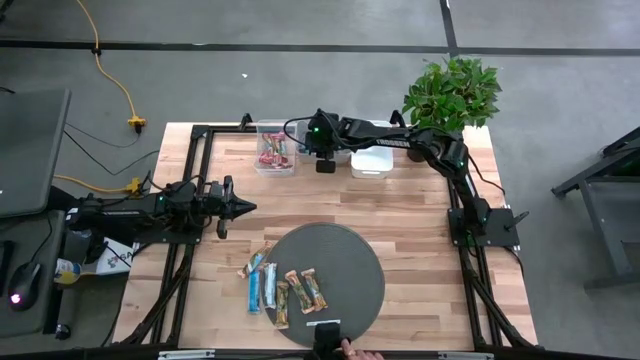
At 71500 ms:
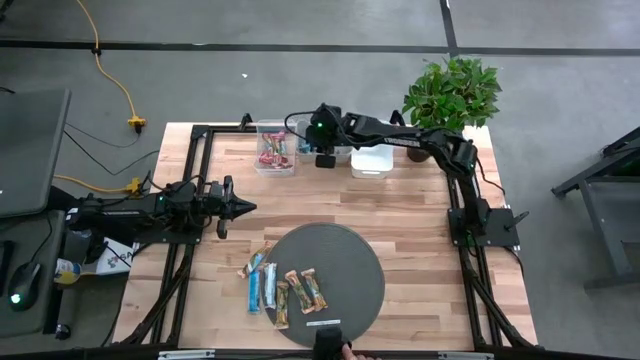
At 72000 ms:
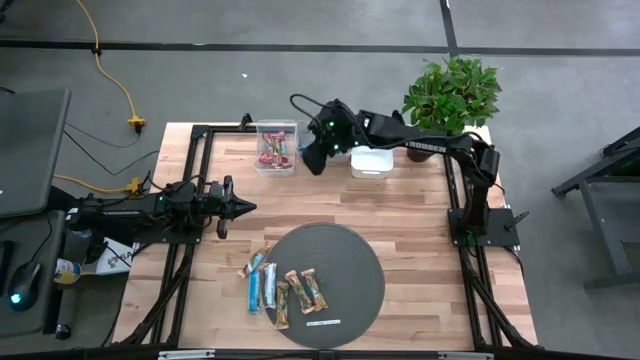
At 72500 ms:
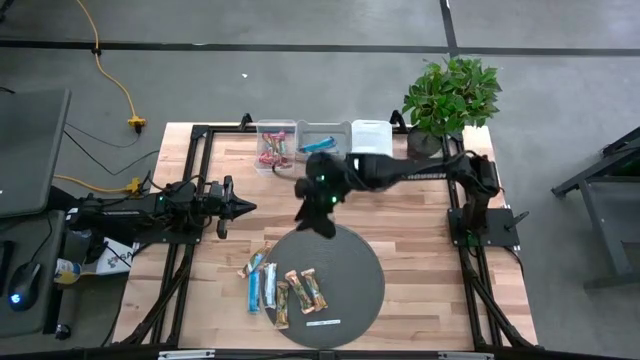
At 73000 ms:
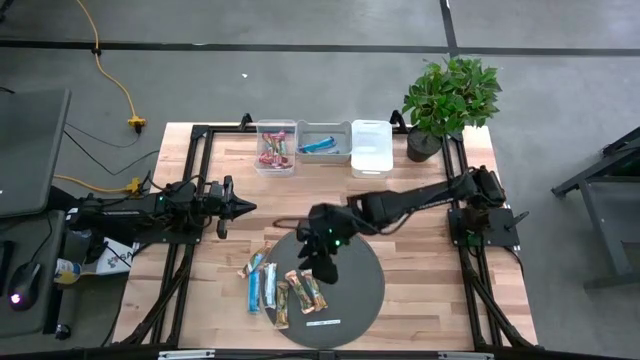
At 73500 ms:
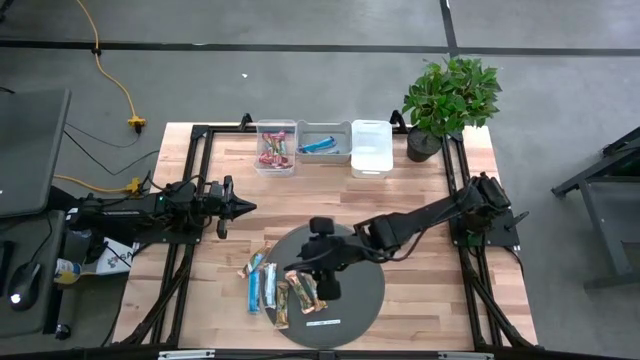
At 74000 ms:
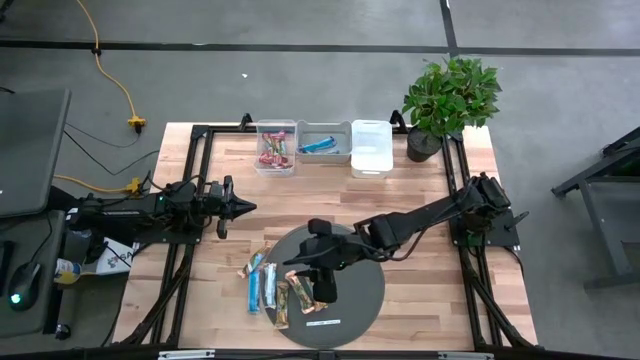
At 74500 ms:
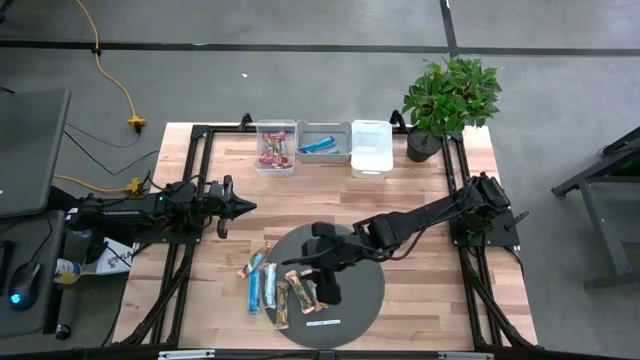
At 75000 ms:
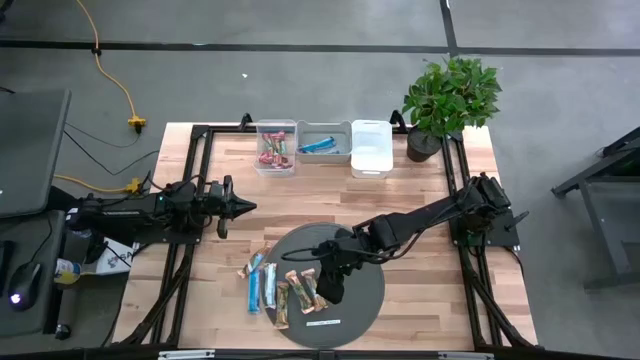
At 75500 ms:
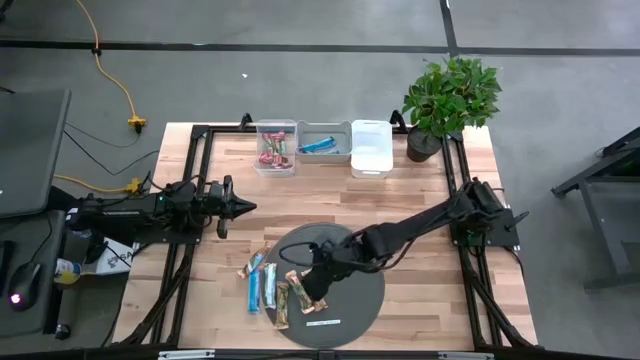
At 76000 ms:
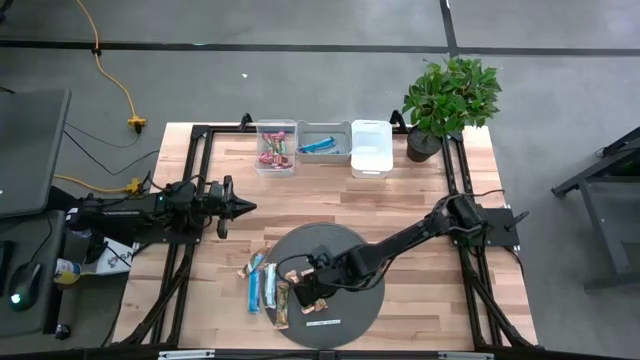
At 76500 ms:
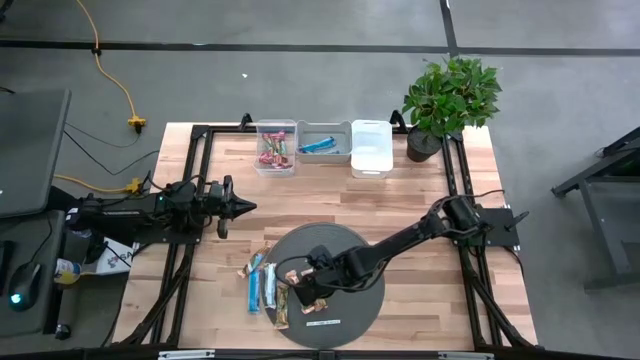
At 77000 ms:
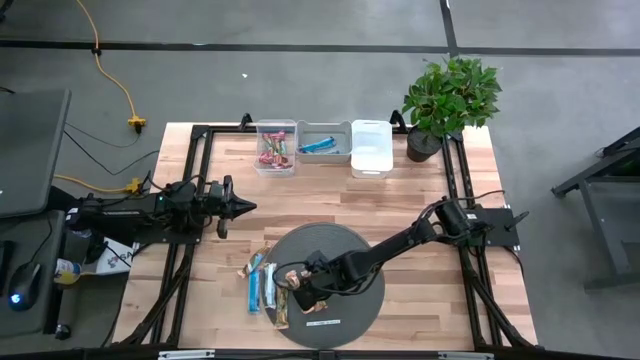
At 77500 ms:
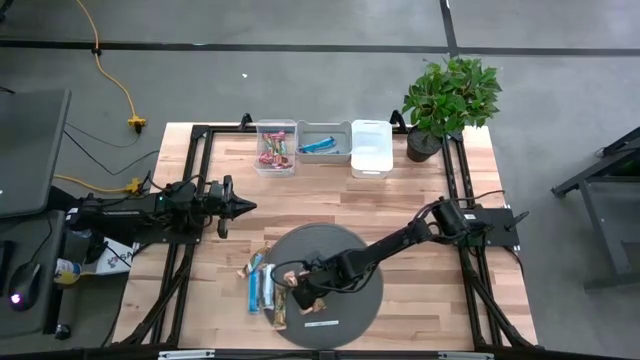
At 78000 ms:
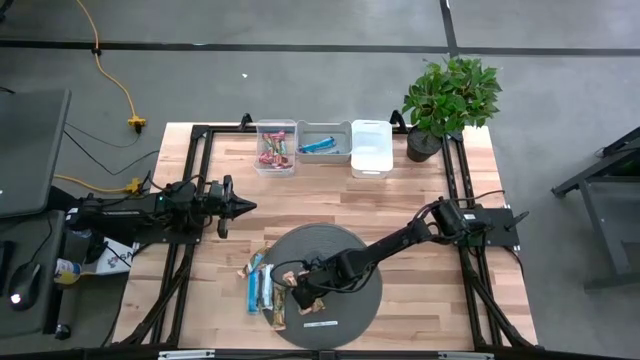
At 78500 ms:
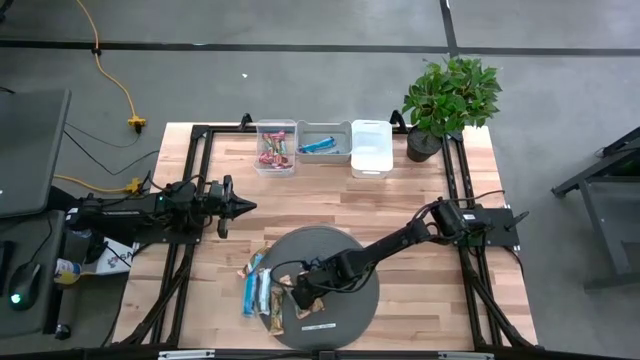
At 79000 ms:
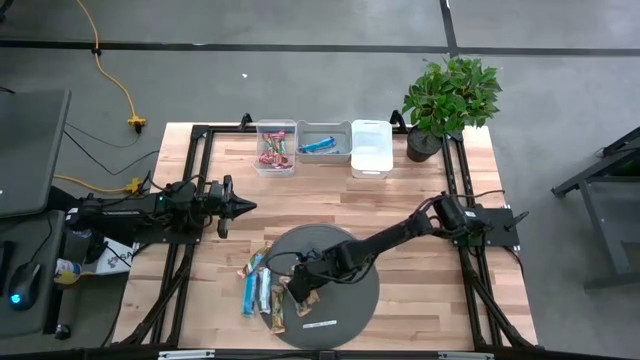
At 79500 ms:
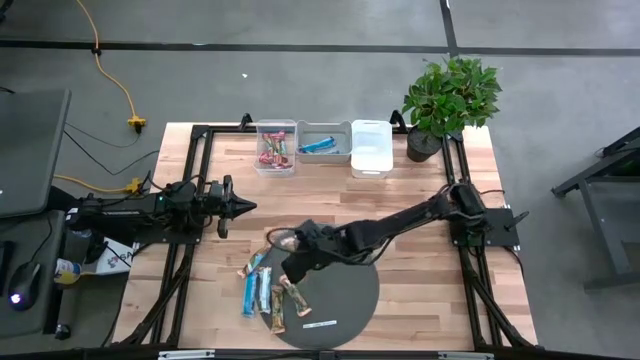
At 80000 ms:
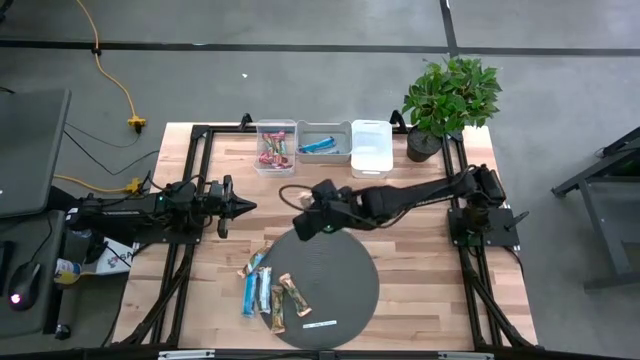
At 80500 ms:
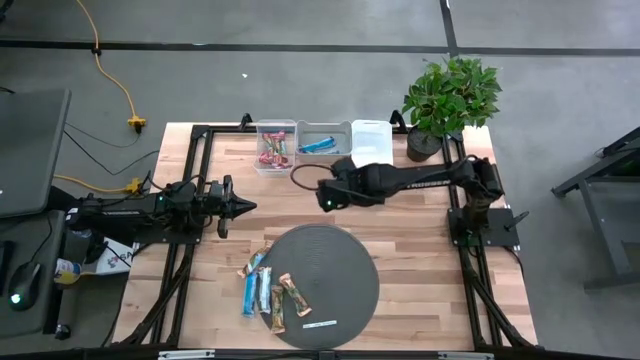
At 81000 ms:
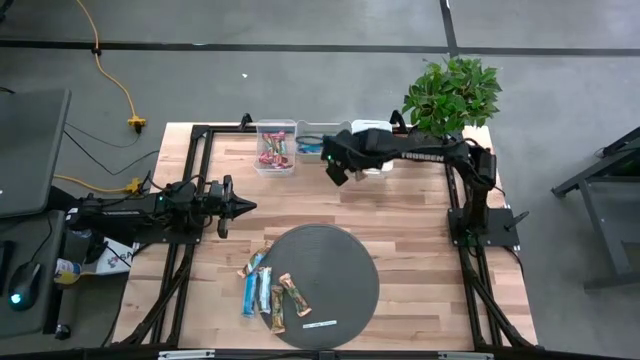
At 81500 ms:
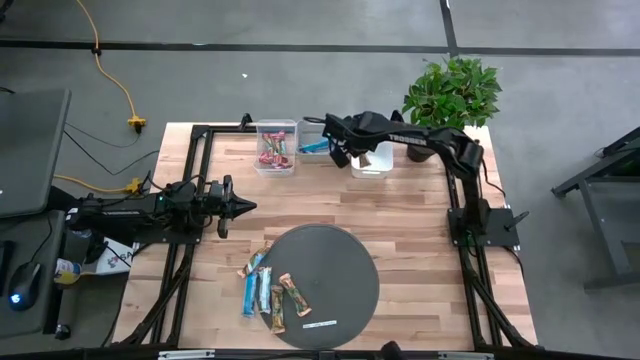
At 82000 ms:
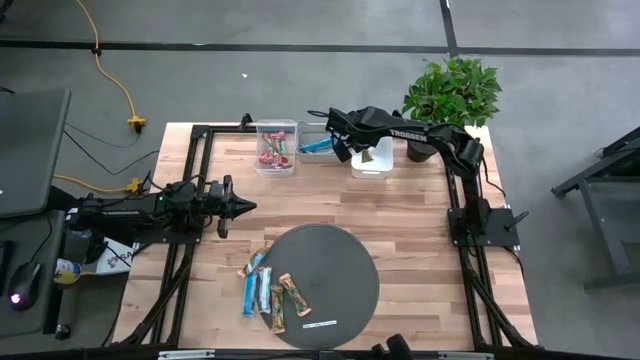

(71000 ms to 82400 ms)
Task: Pick and place Granola Bars by type
Put the orange granola bar into the white bin

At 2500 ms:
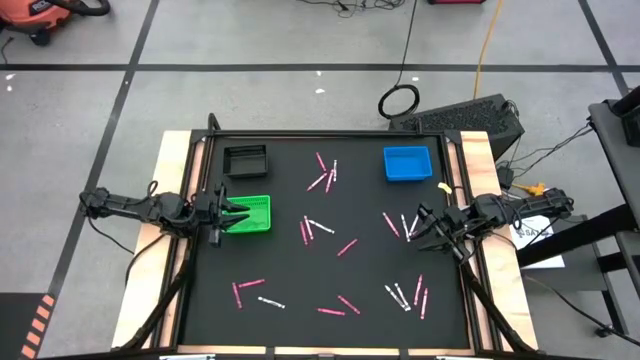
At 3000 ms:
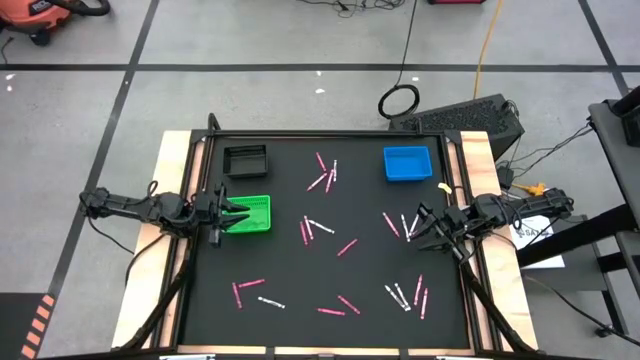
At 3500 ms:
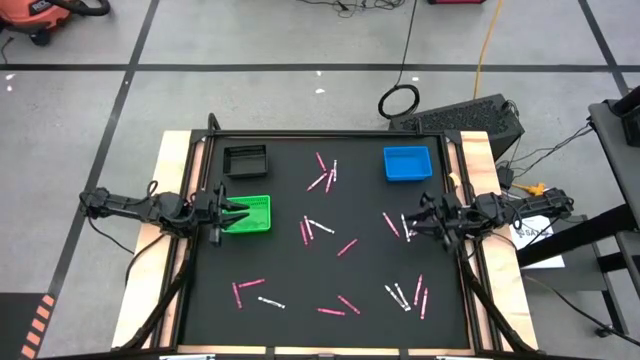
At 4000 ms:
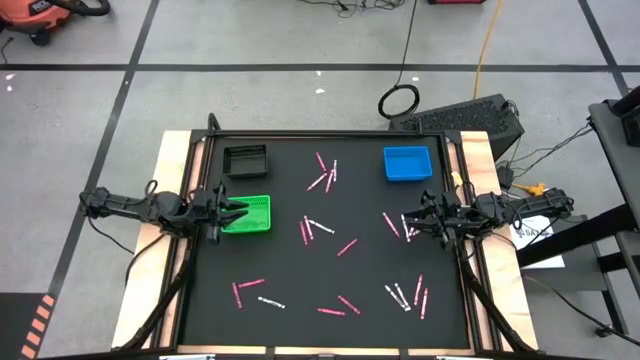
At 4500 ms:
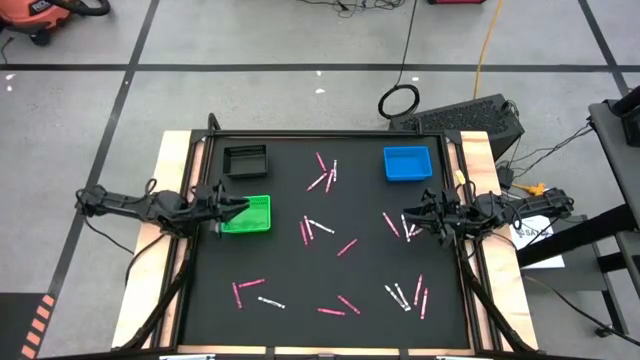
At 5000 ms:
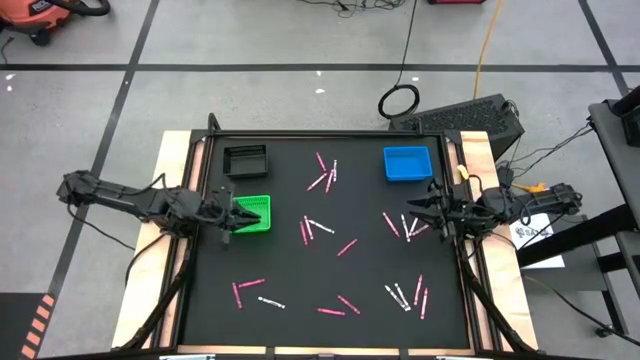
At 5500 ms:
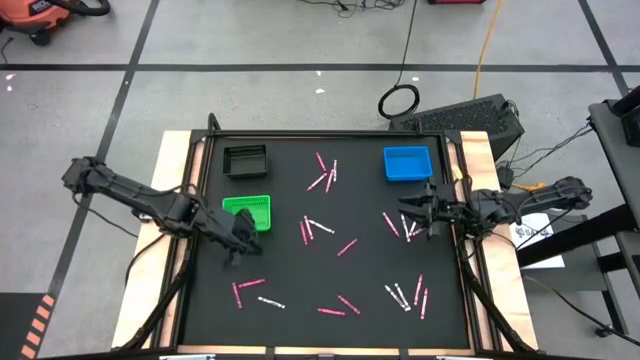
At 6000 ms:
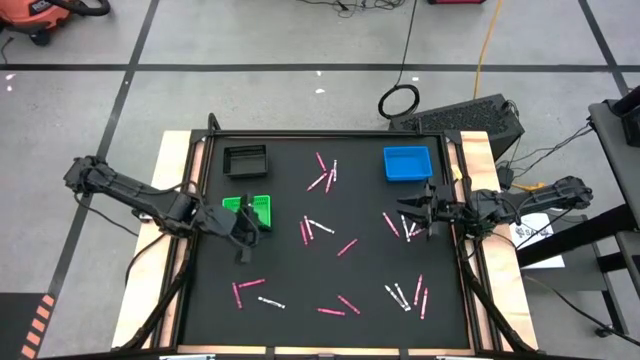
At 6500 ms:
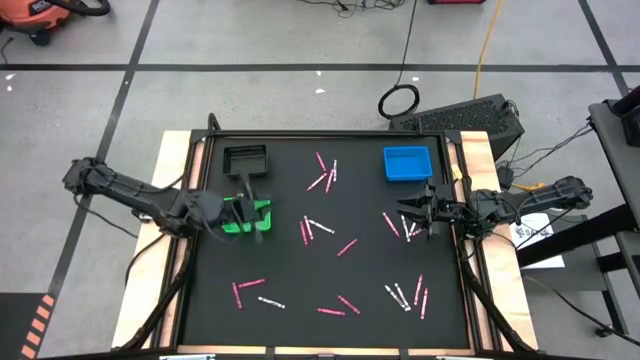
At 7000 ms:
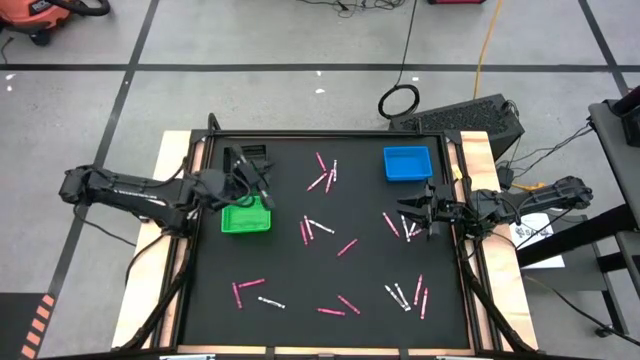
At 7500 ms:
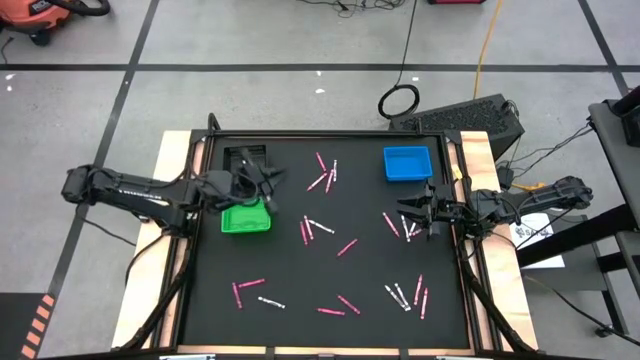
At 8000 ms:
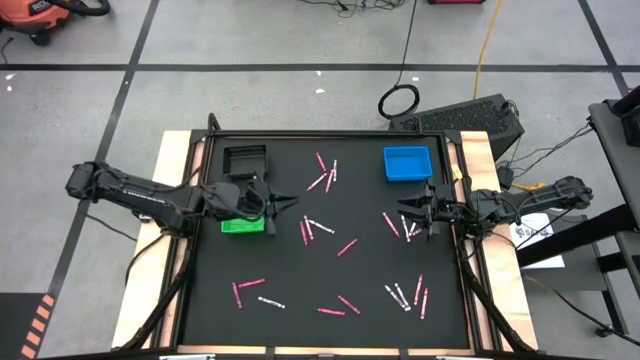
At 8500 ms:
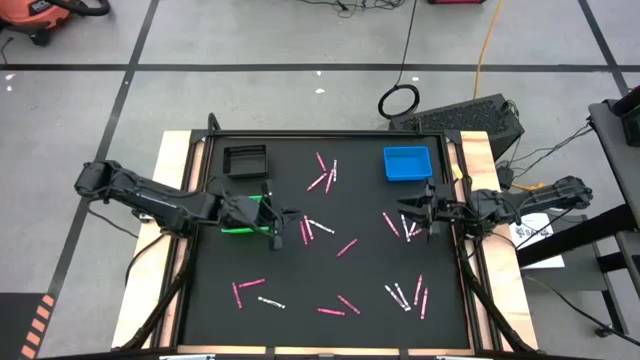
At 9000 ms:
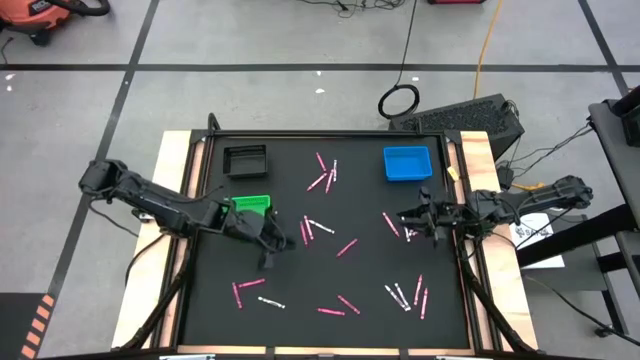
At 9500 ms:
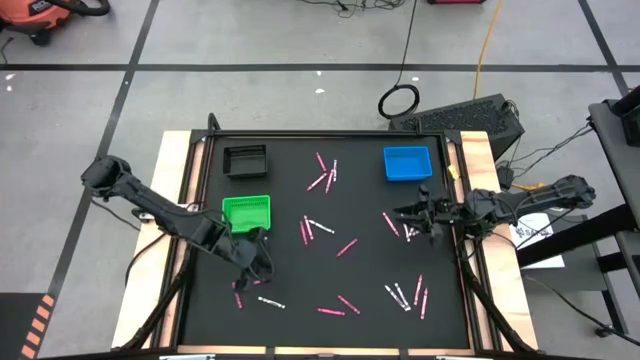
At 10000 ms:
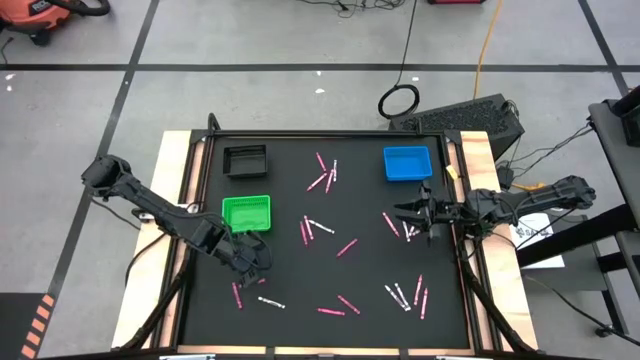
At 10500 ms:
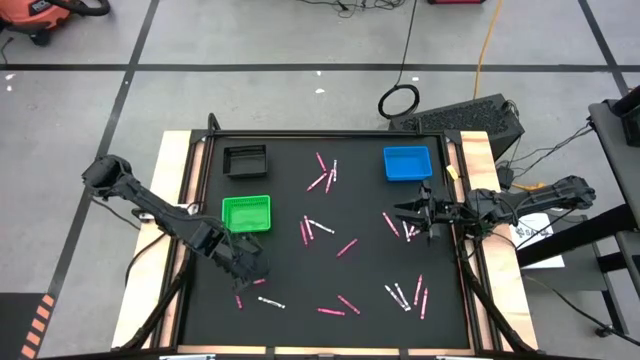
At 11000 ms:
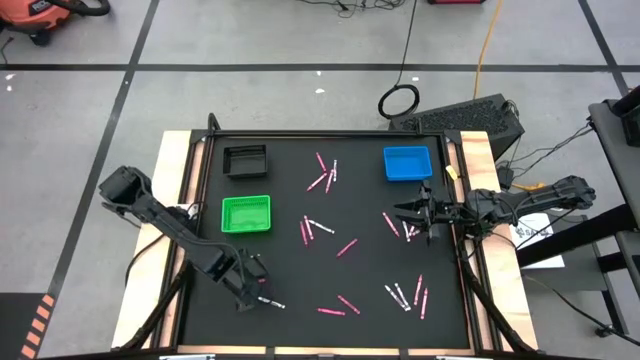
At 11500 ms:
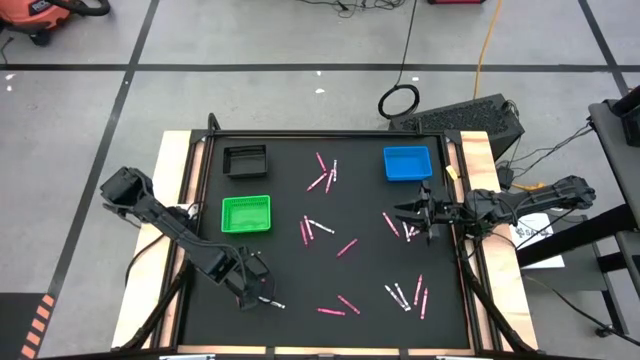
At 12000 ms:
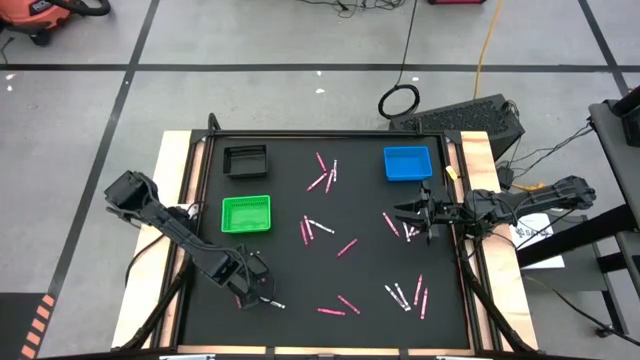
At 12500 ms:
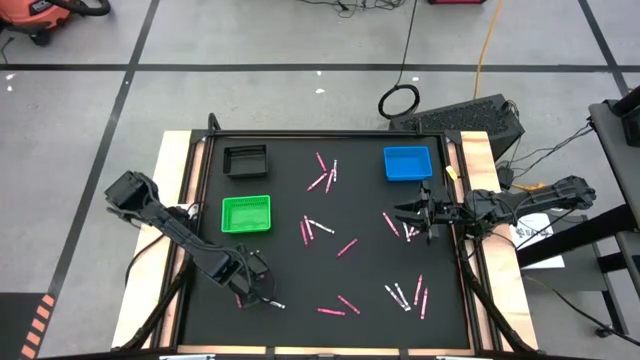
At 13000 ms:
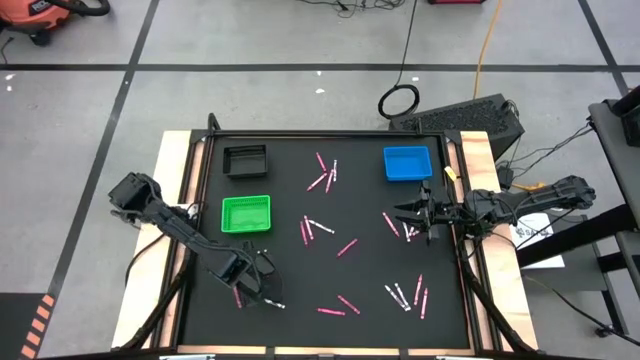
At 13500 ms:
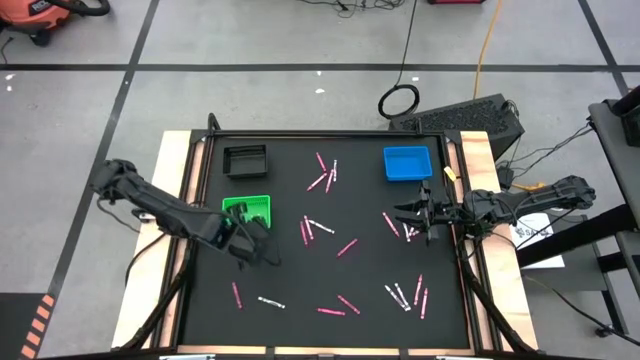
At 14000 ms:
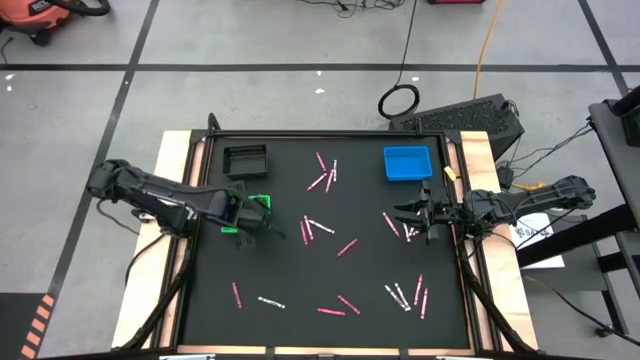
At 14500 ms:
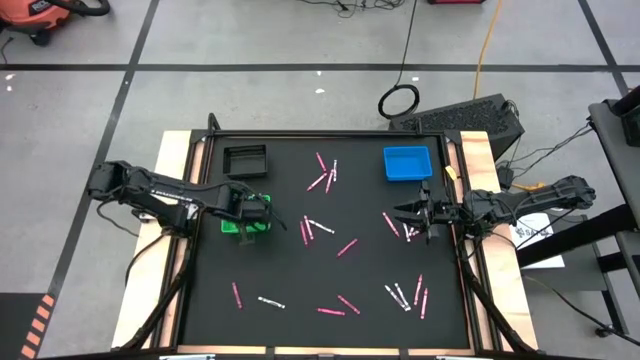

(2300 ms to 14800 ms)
Task: Sort crayons
Put the red crayon into the green bin
